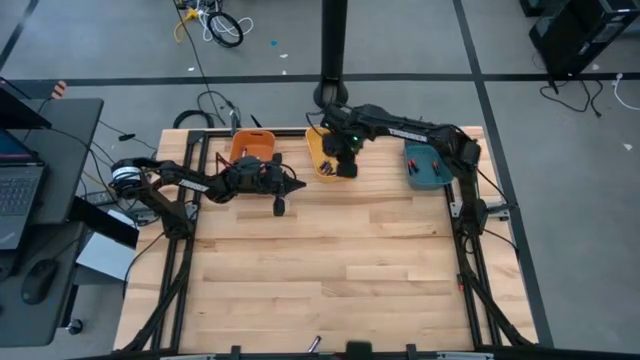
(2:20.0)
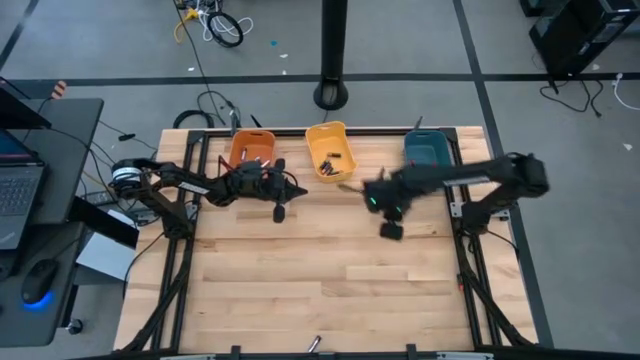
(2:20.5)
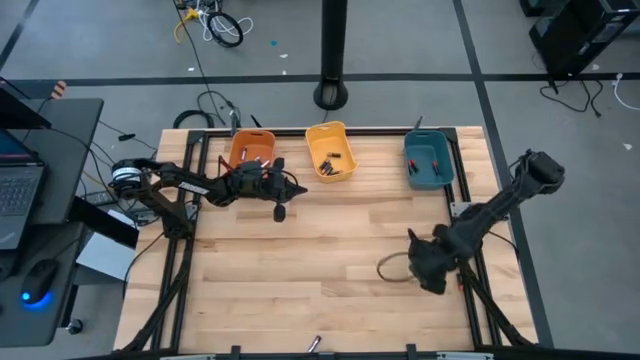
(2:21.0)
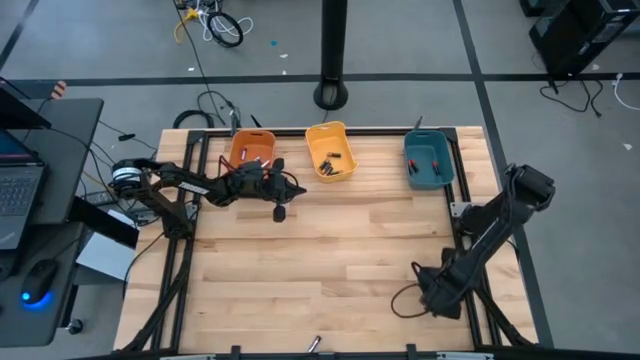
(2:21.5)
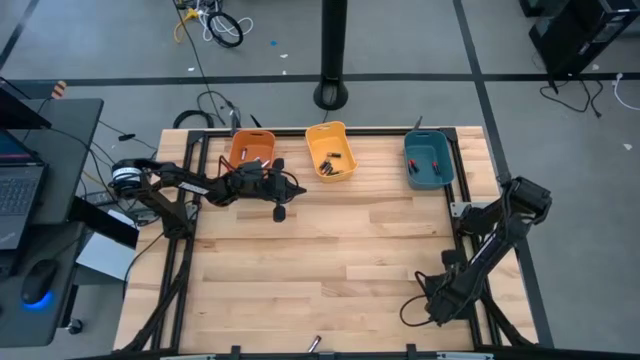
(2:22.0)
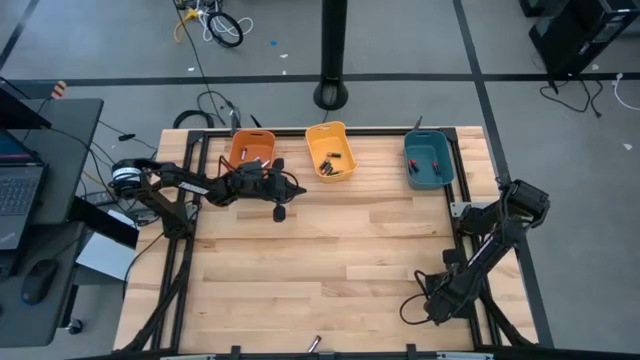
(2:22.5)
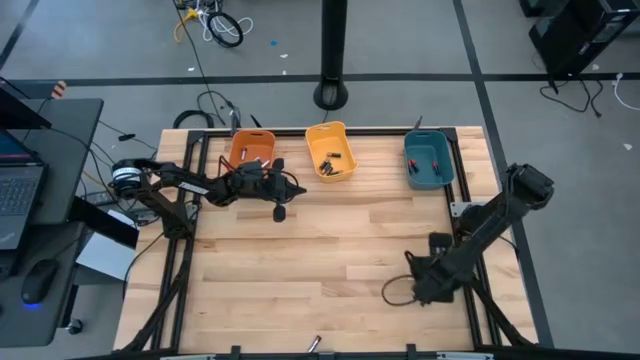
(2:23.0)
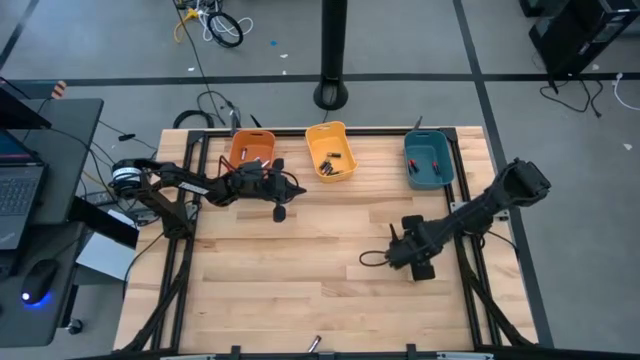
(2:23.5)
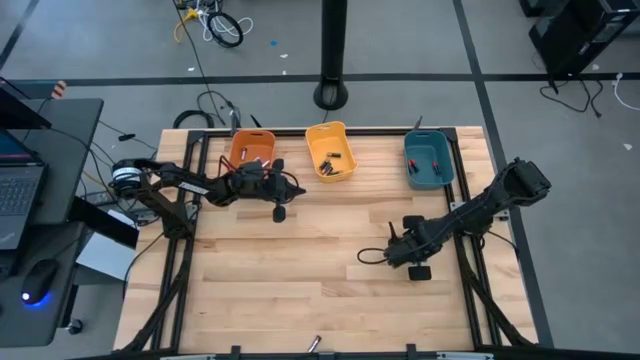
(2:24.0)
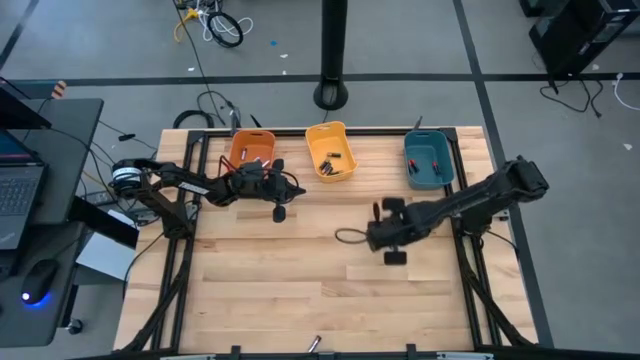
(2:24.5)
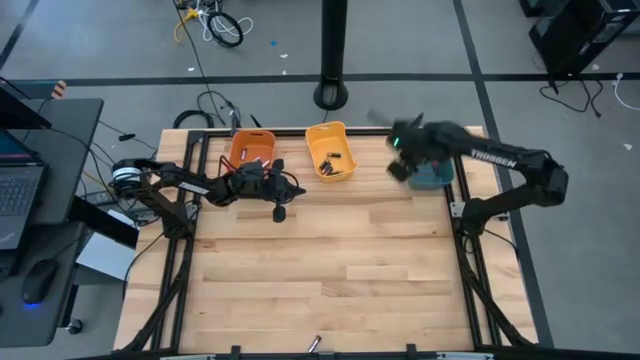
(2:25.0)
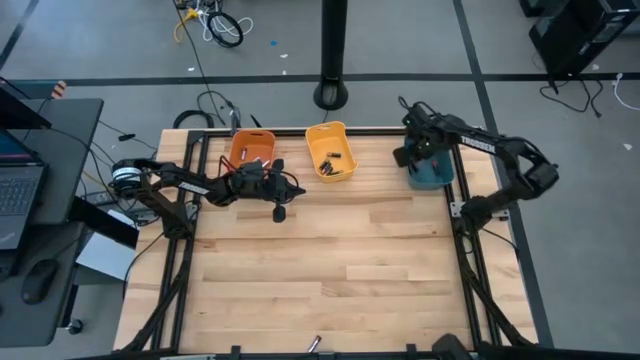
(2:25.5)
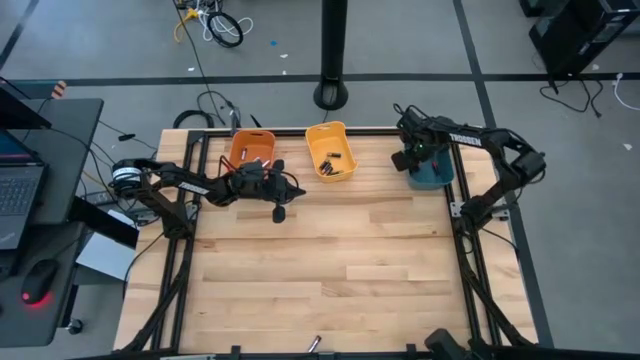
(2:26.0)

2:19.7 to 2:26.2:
Task: Sort batteries
Put the orange battery into the blue bin

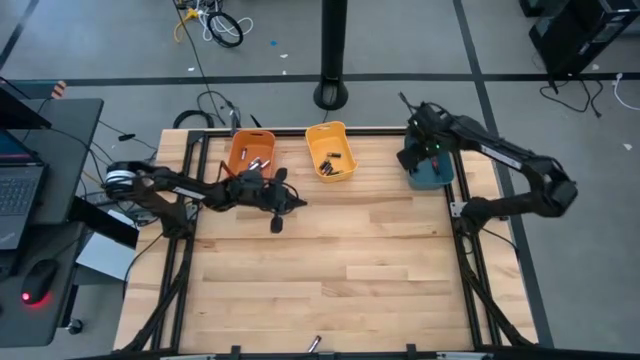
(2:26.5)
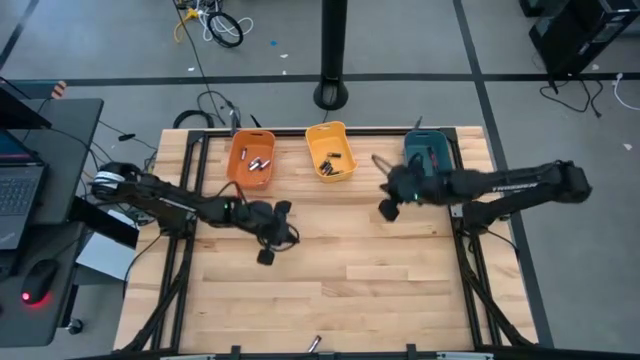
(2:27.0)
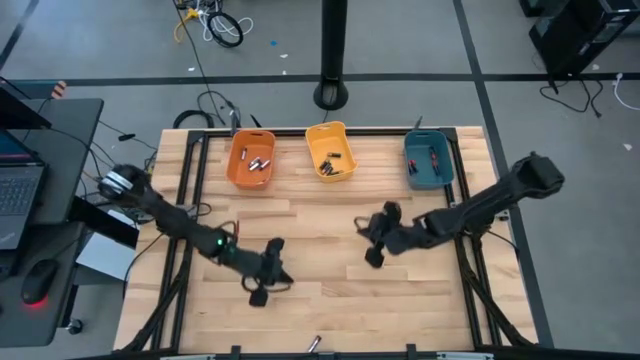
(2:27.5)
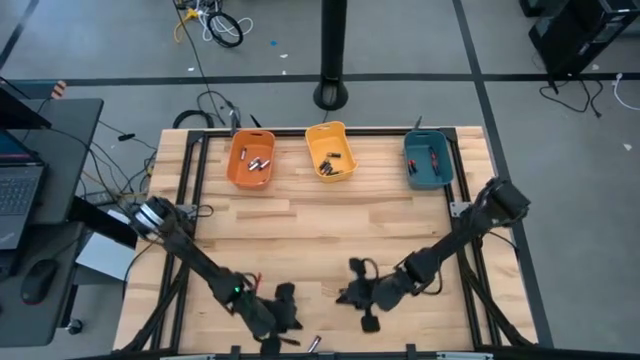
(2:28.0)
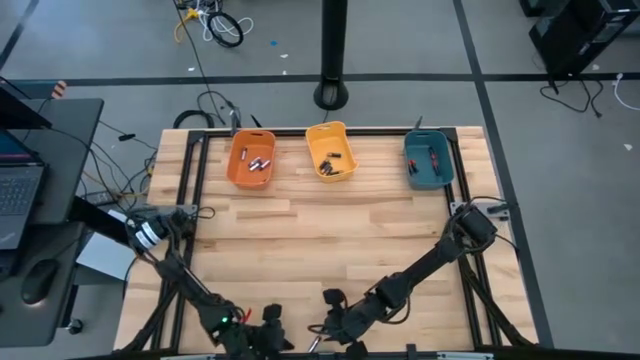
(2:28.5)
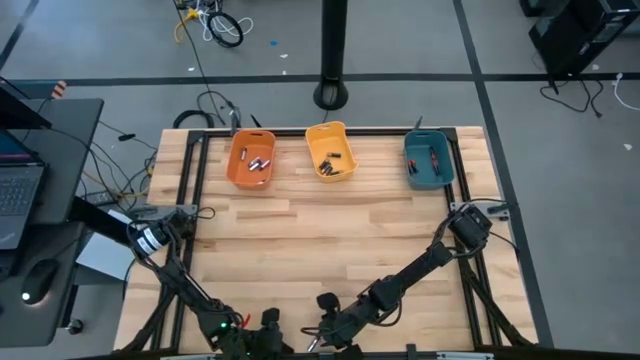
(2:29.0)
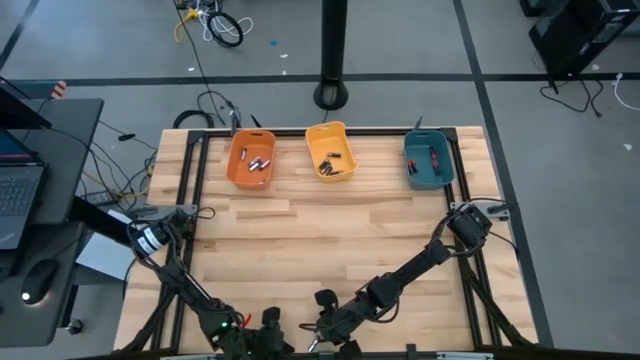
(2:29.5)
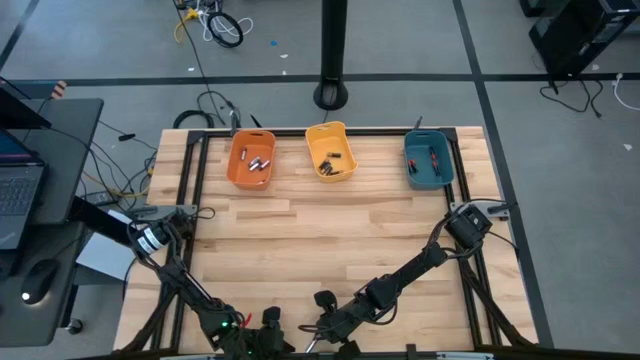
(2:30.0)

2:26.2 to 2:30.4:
Put the silver battery into the orange bin

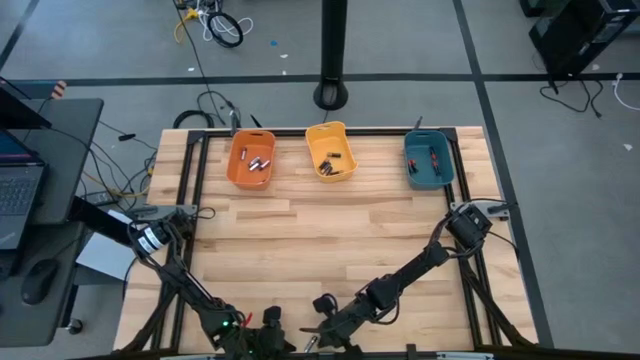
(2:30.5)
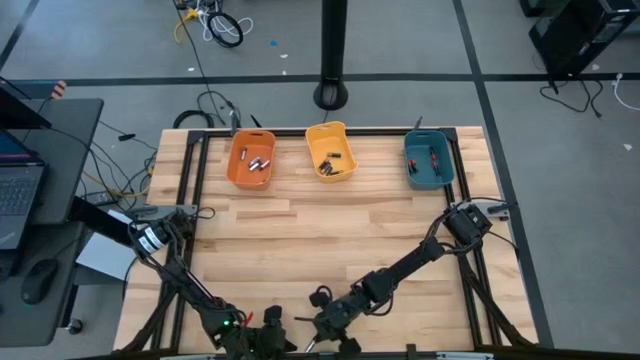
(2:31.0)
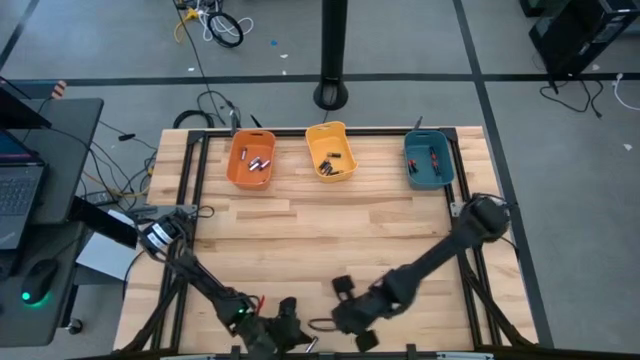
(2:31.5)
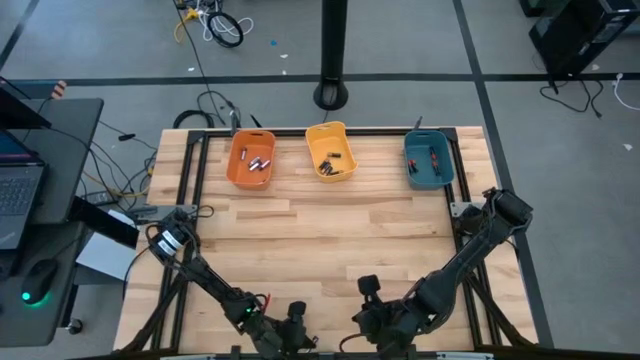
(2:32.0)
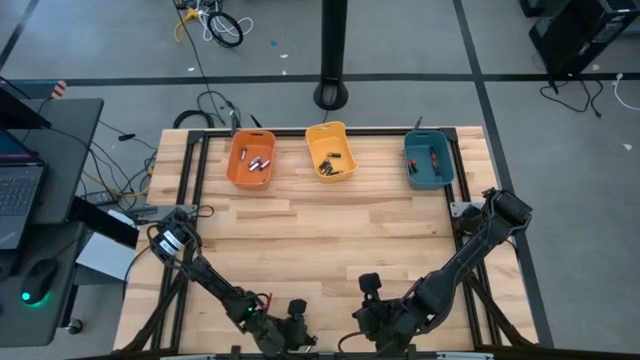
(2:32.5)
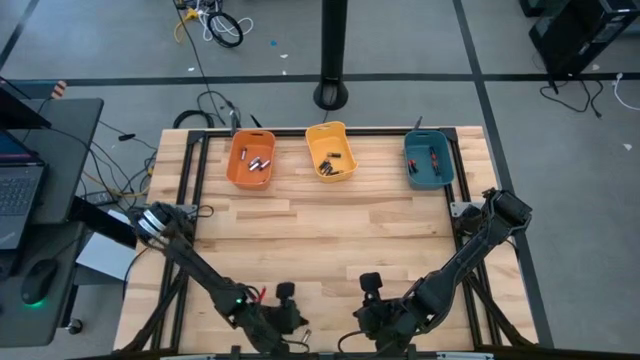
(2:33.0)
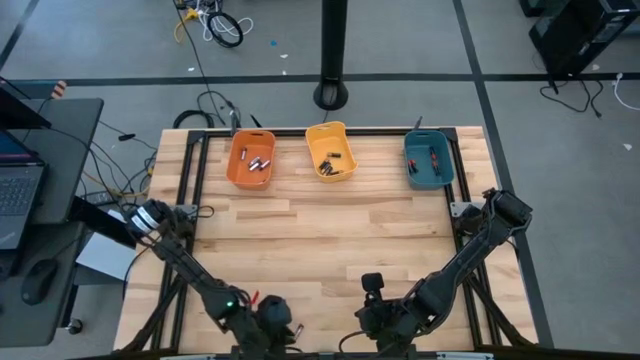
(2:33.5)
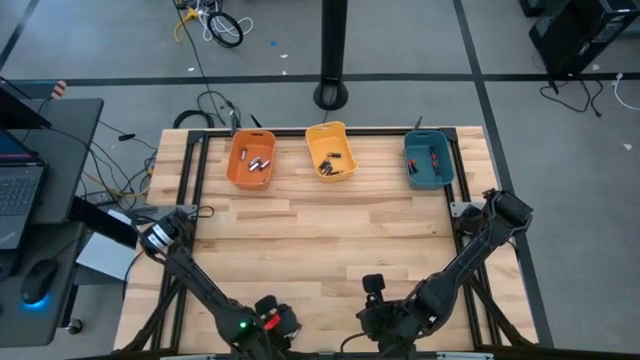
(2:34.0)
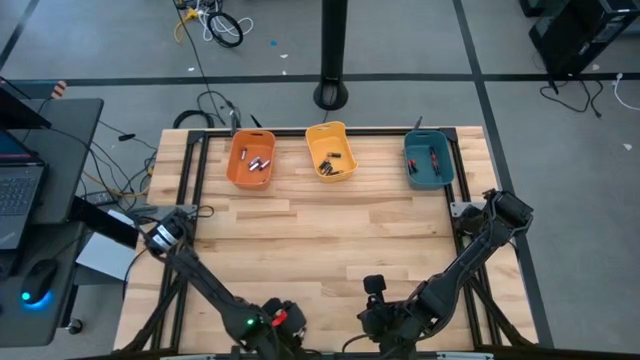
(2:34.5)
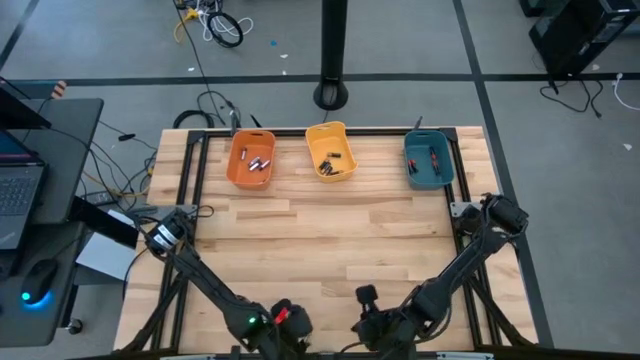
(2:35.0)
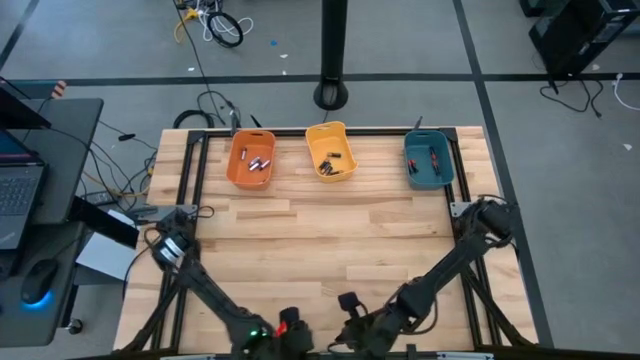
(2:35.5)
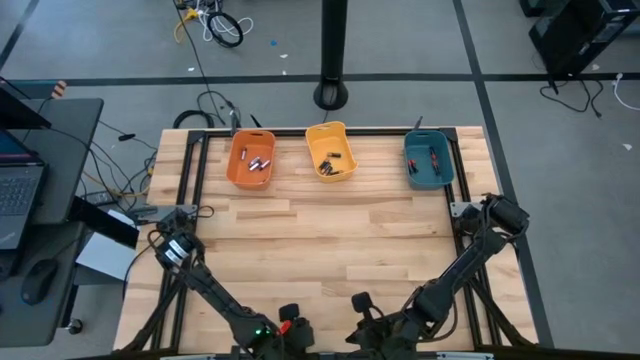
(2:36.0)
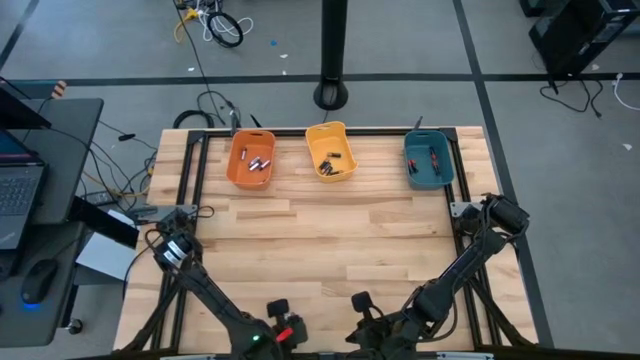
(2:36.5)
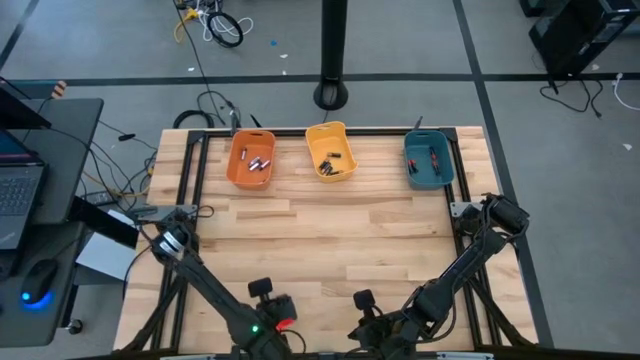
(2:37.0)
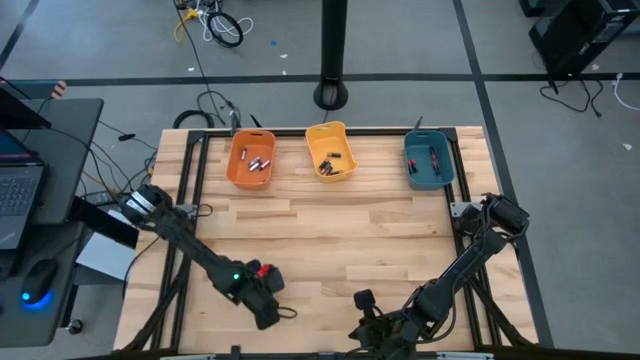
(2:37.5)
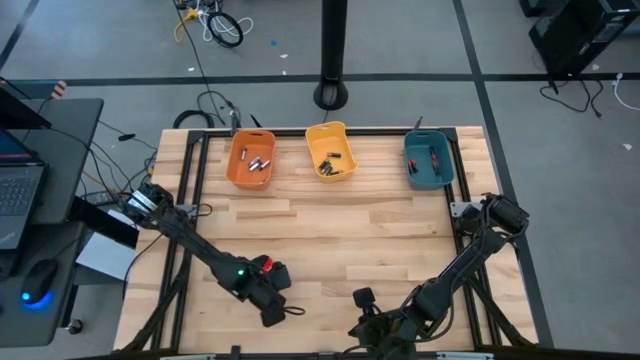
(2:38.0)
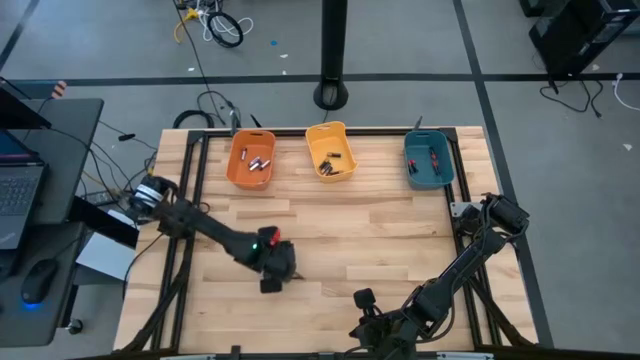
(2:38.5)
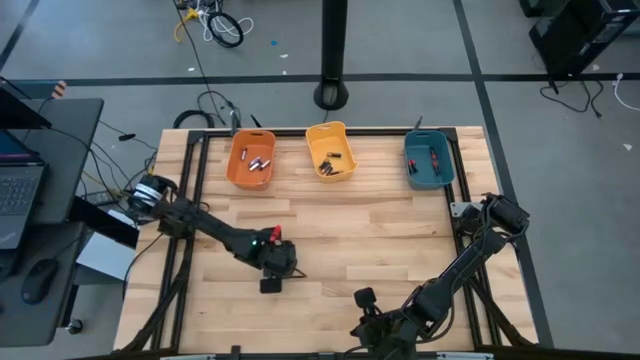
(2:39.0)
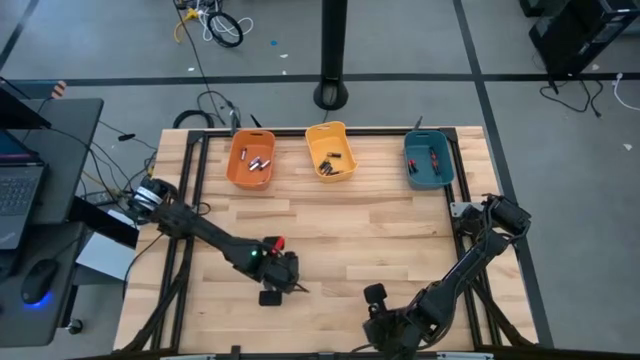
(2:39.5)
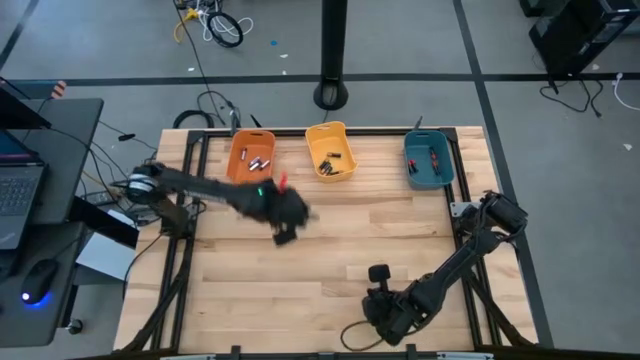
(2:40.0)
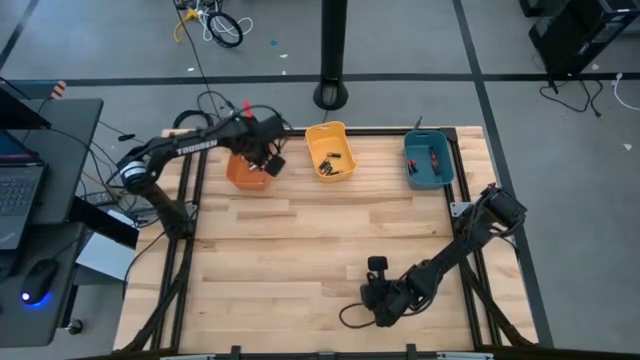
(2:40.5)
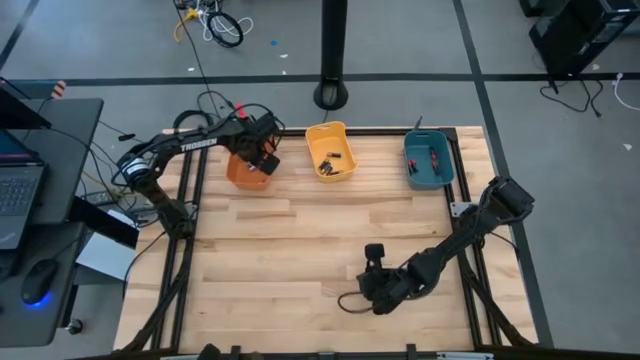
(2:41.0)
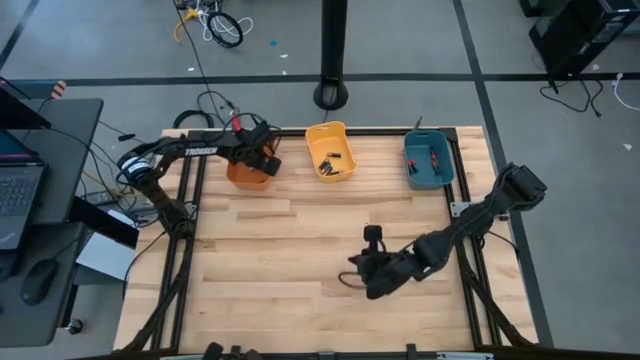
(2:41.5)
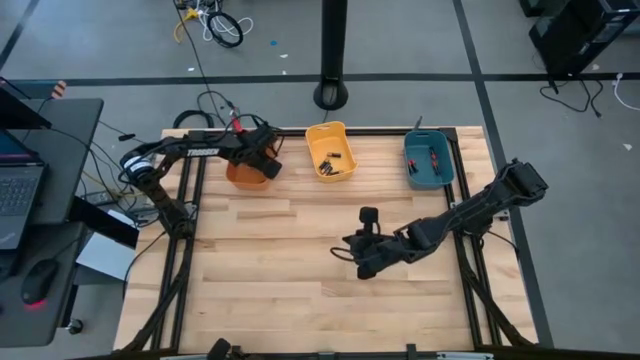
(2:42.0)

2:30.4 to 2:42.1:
Put the silver battery into the orange bin

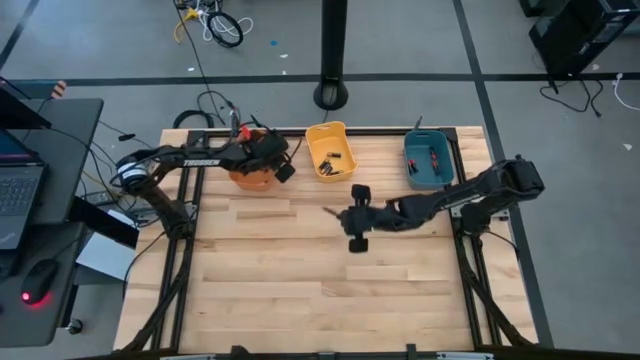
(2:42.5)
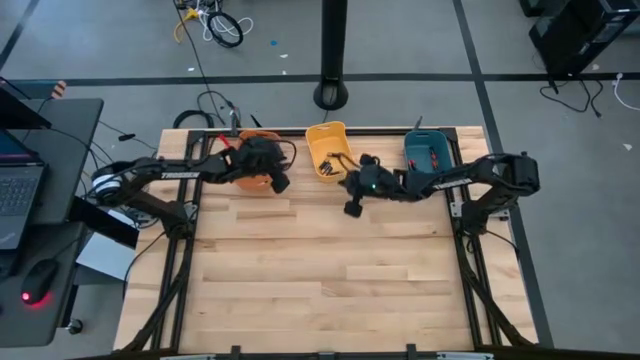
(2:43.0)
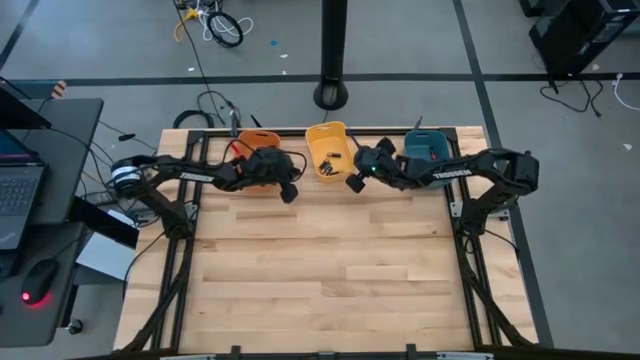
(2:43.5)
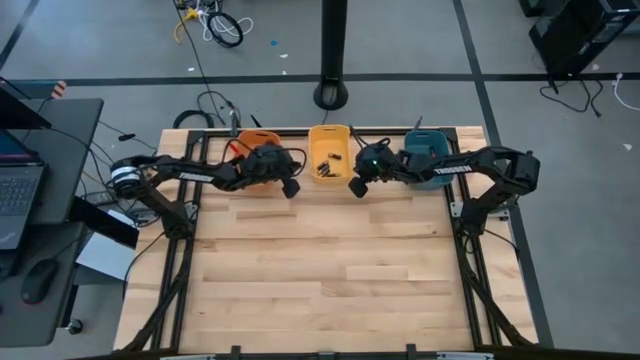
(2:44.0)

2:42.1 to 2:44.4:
Adjust the yellow bin
